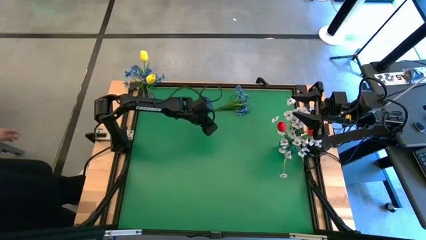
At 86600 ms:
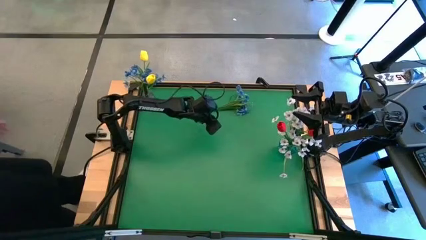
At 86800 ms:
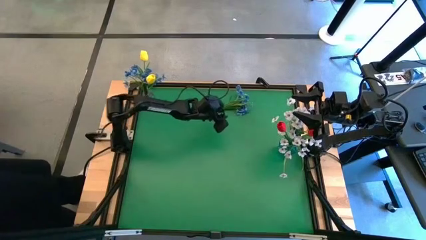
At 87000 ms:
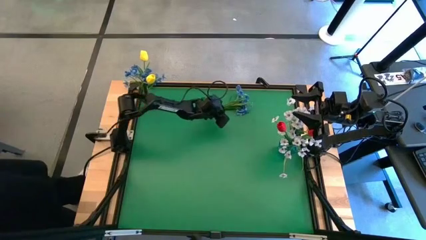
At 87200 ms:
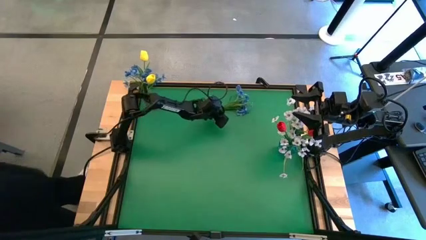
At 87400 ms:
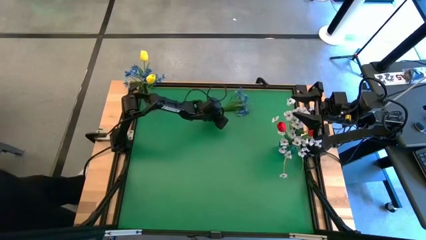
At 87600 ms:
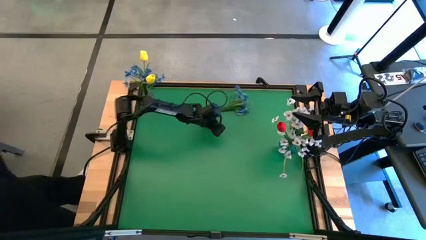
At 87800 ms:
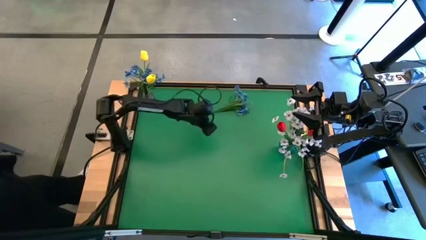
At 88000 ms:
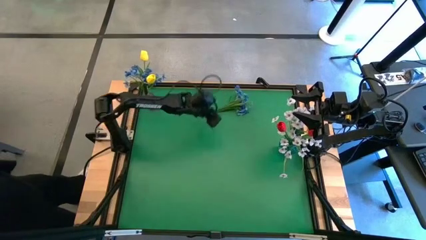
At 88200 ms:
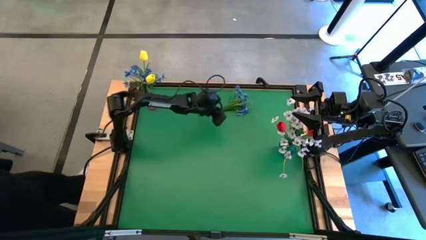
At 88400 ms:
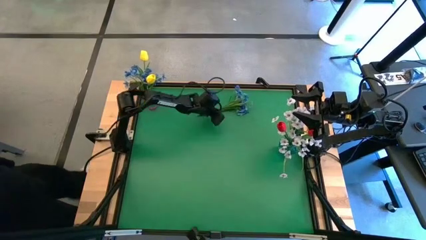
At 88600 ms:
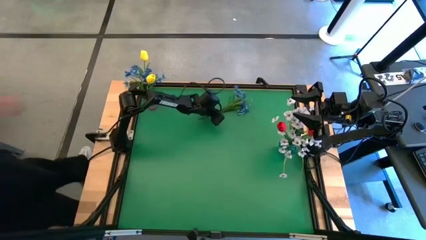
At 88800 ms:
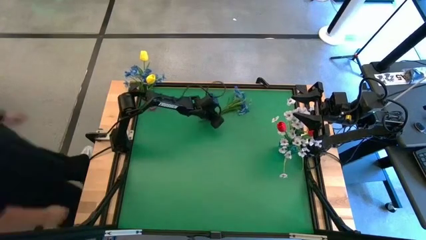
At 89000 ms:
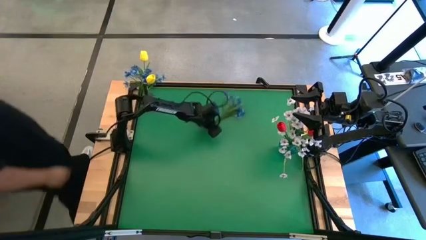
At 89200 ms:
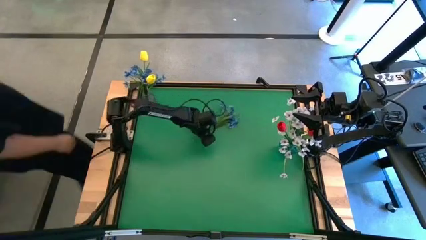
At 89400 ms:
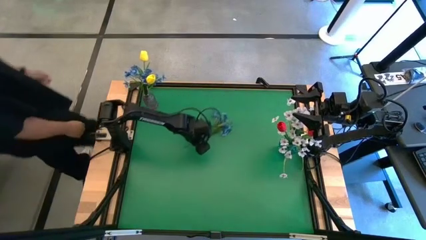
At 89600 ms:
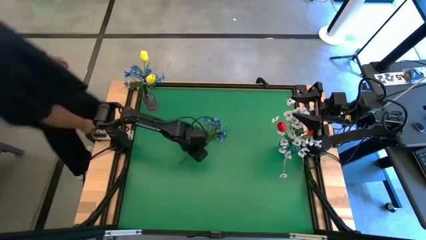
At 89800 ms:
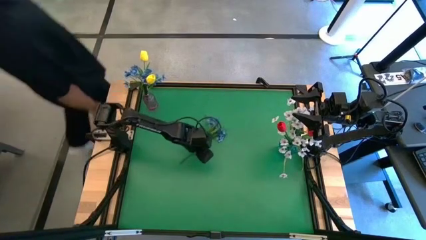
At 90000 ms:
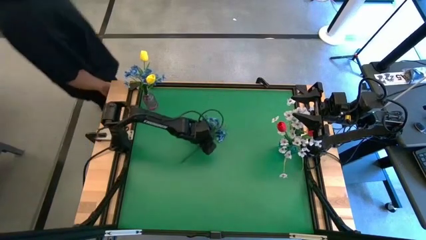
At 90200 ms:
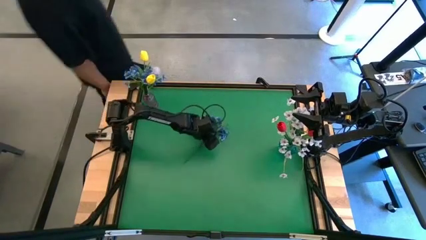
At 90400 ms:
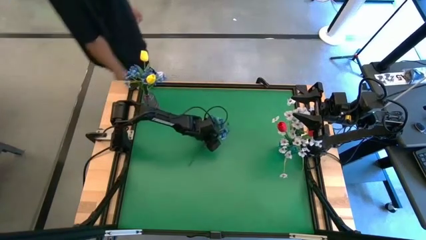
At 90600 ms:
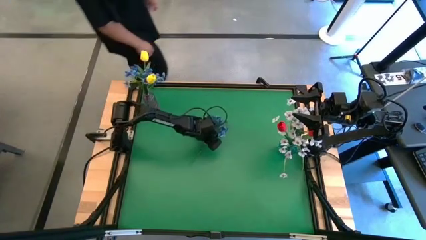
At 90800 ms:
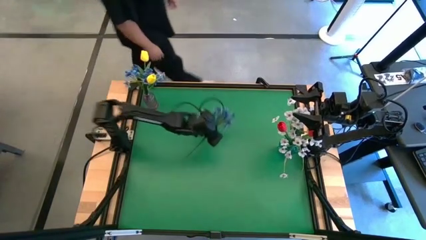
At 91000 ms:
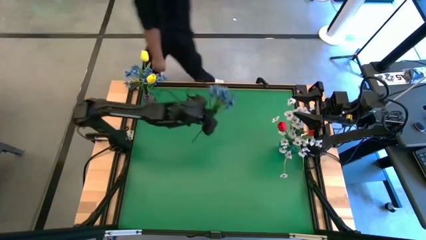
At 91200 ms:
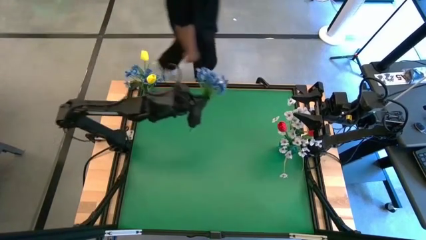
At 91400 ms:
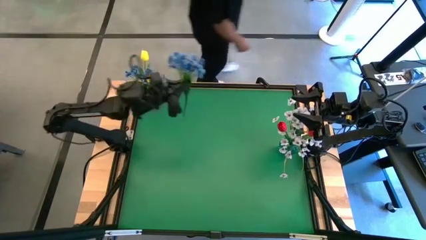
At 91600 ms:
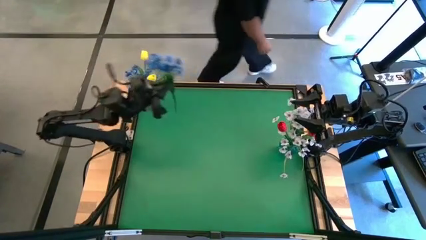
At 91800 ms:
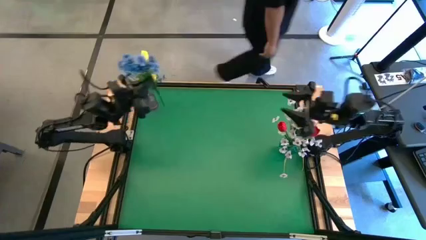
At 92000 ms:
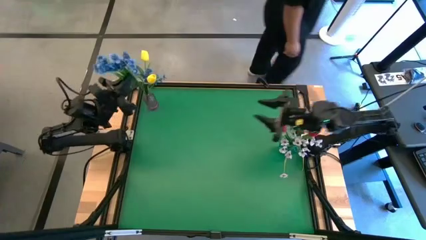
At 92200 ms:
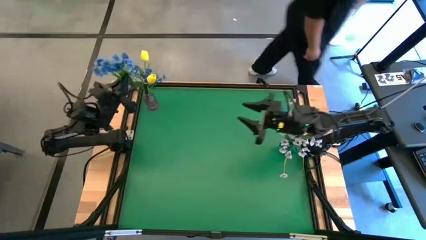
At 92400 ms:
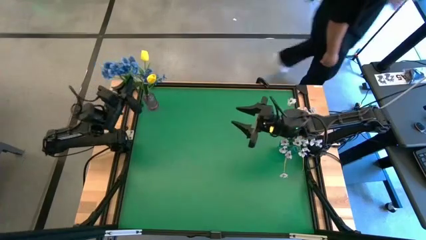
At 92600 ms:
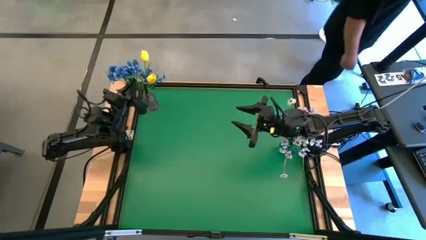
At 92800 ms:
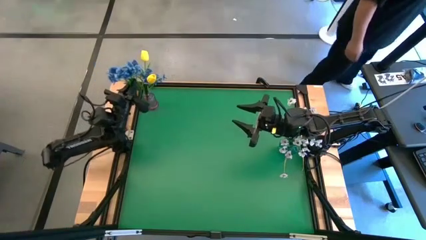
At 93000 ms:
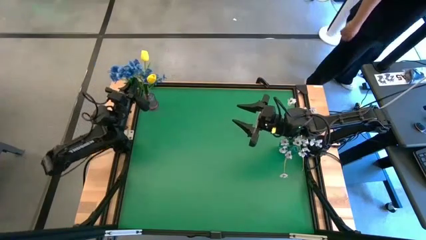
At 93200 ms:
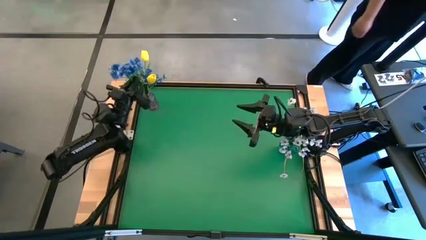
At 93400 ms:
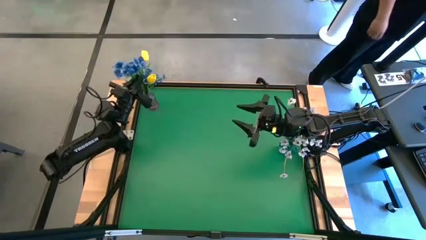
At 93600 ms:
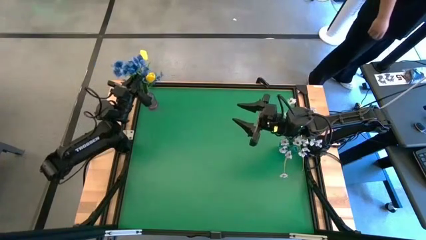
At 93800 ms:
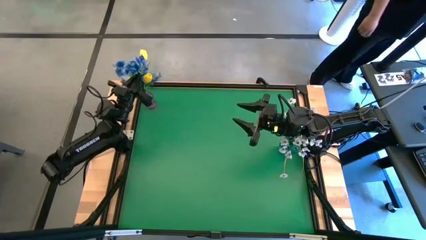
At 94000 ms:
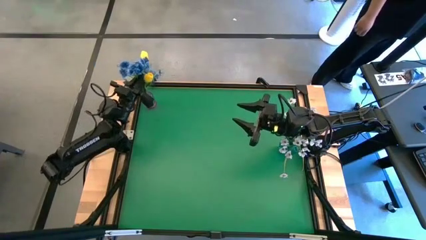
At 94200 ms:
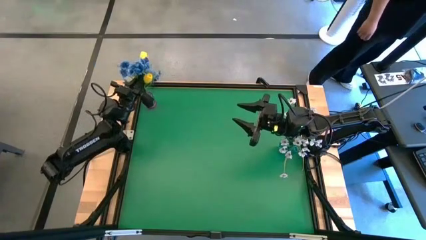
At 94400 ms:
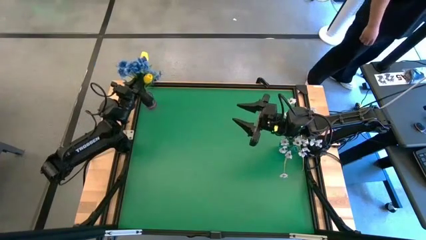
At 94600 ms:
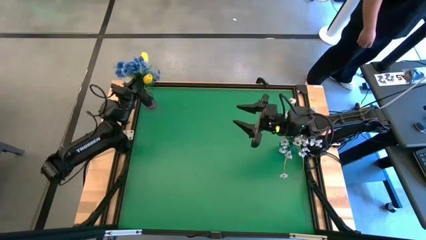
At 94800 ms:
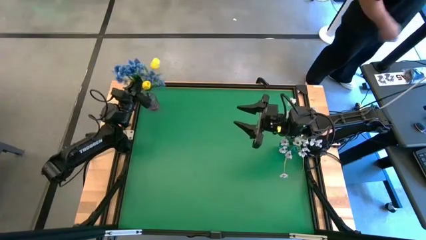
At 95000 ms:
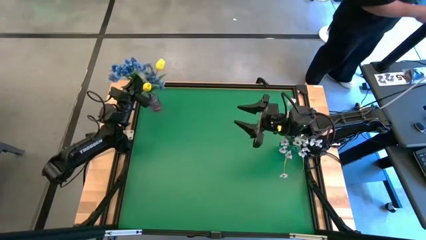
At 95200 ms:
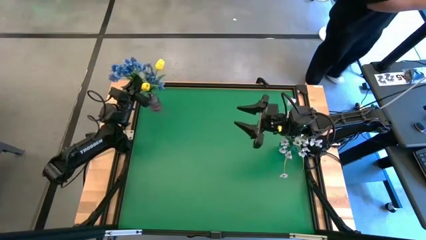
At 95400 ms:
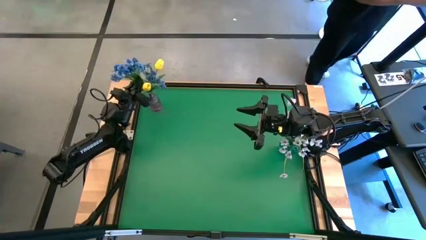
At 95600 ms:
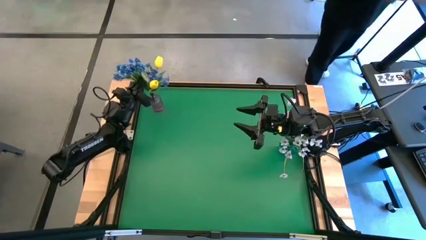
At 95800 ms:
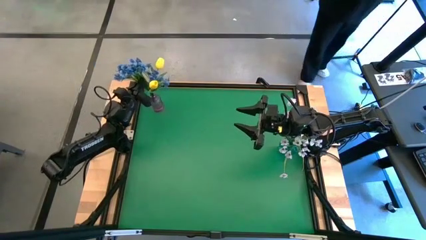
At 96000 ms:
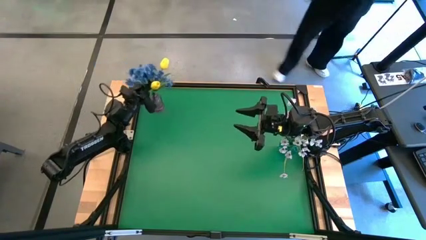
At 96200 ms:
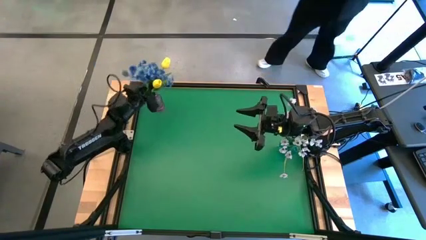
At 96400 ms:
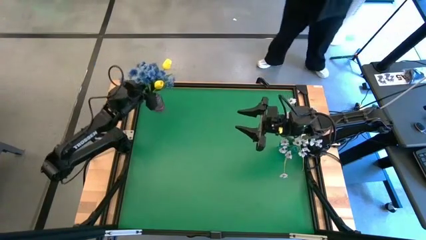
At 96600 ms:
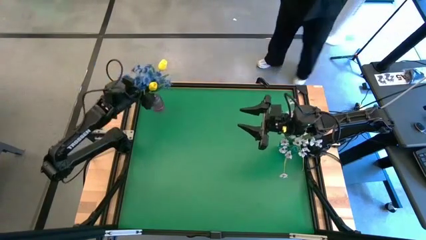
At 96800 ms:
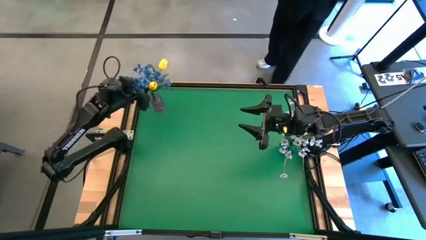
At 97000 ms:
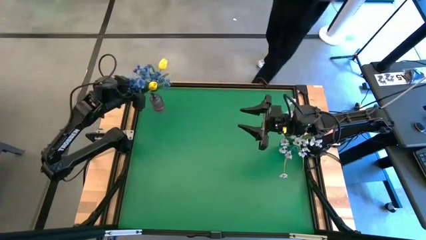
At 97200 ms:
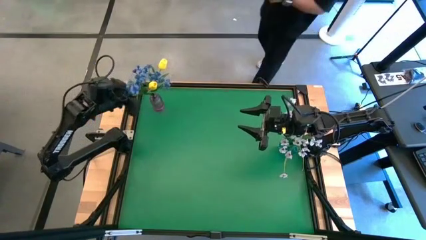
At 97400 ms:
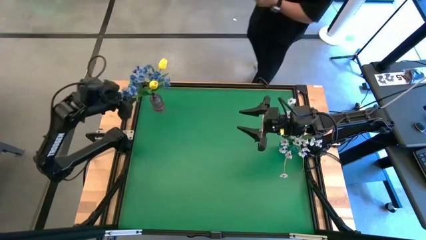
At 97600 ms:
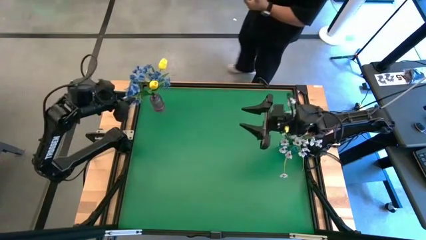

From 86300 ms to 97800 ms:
Task: Sort flowers into vase by color
Put the blue flowers into the violet vase

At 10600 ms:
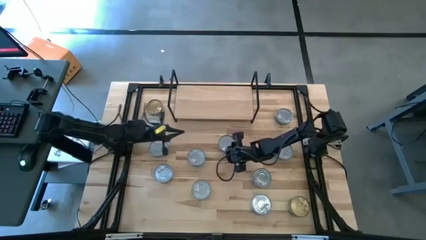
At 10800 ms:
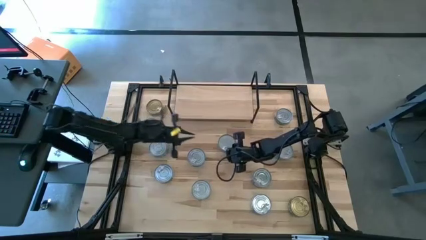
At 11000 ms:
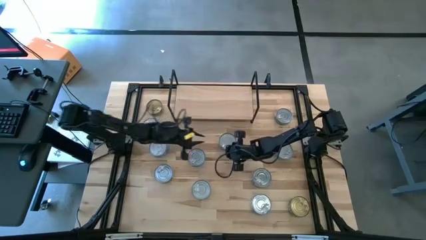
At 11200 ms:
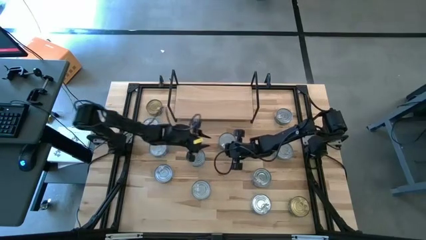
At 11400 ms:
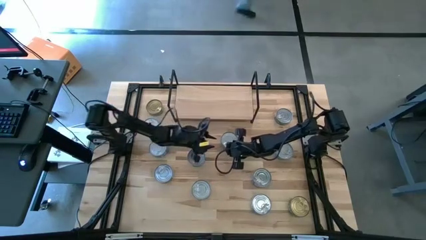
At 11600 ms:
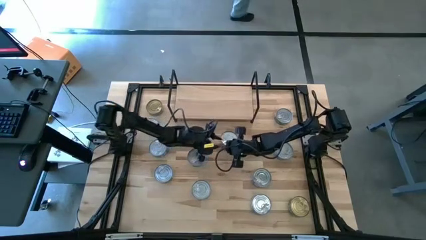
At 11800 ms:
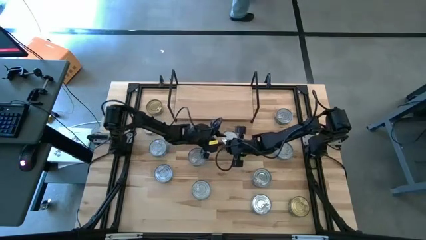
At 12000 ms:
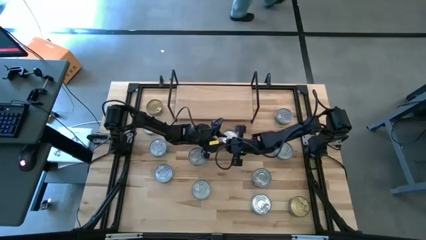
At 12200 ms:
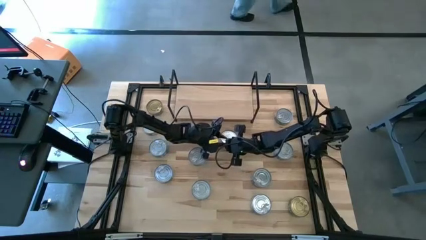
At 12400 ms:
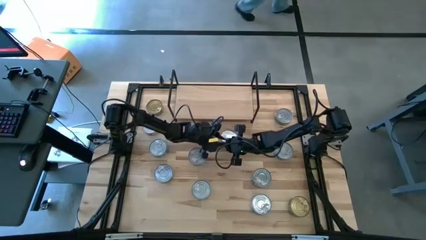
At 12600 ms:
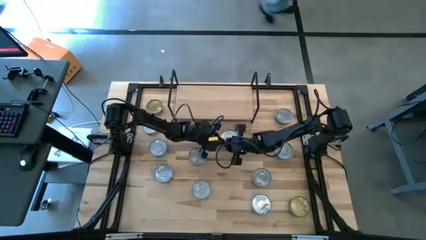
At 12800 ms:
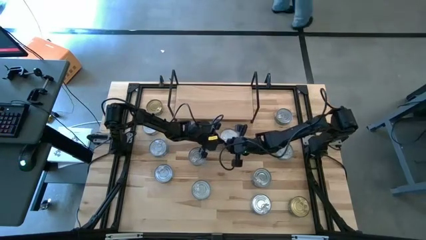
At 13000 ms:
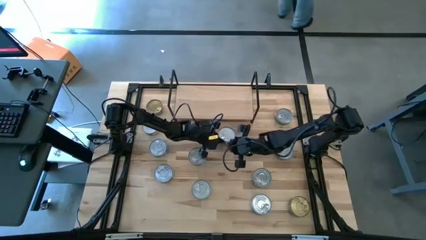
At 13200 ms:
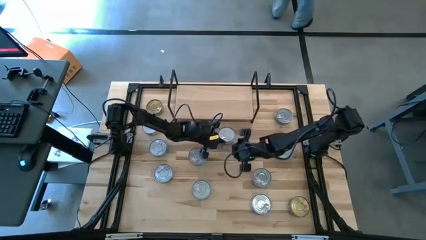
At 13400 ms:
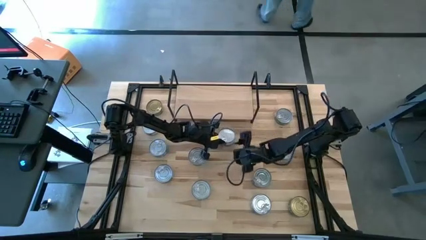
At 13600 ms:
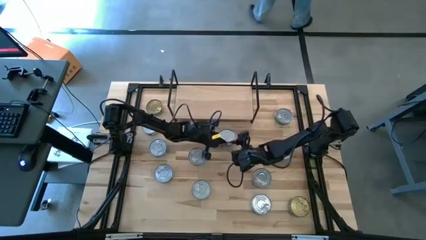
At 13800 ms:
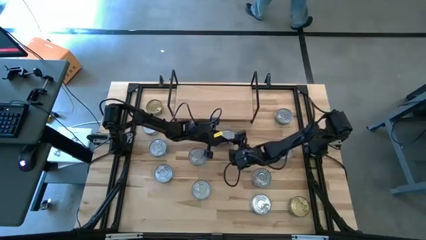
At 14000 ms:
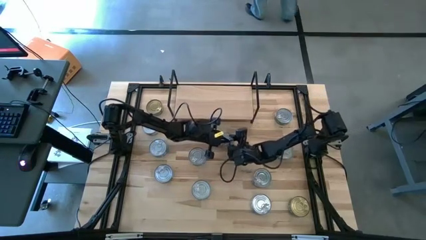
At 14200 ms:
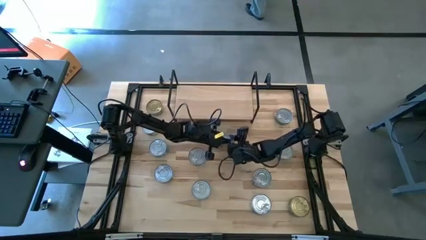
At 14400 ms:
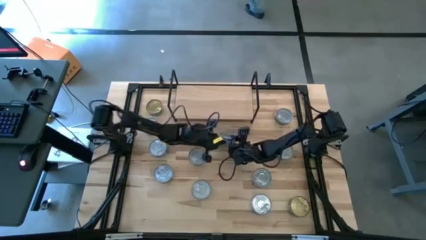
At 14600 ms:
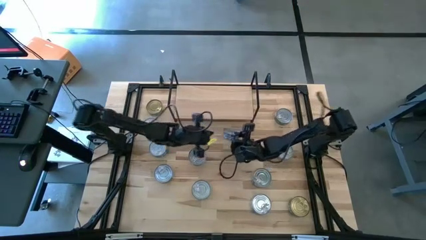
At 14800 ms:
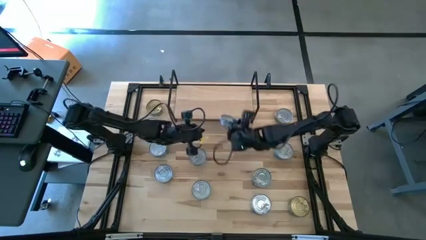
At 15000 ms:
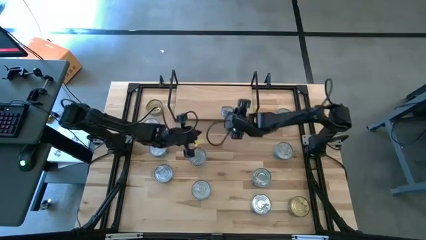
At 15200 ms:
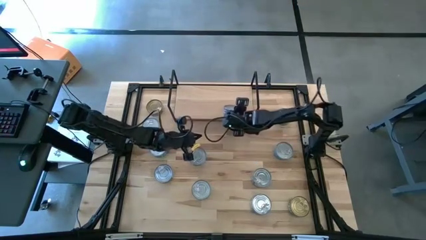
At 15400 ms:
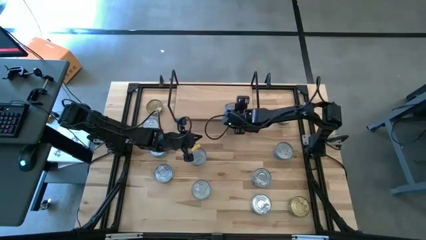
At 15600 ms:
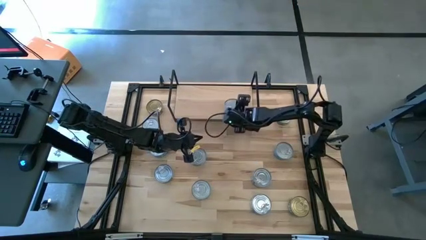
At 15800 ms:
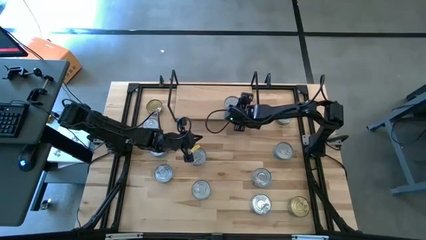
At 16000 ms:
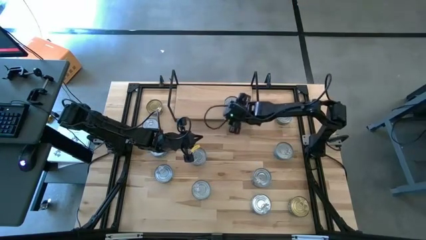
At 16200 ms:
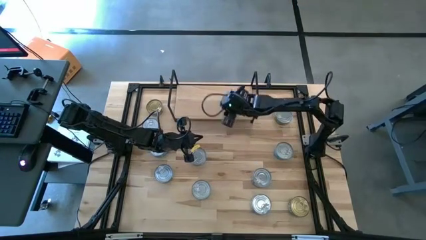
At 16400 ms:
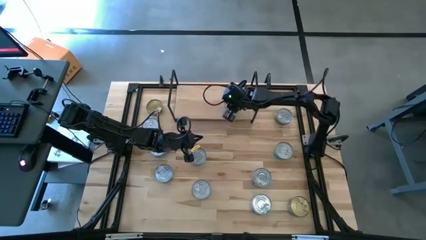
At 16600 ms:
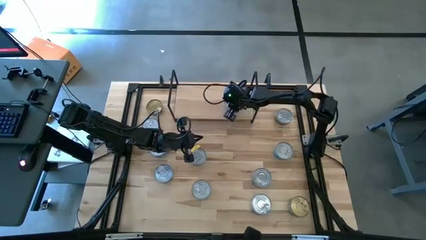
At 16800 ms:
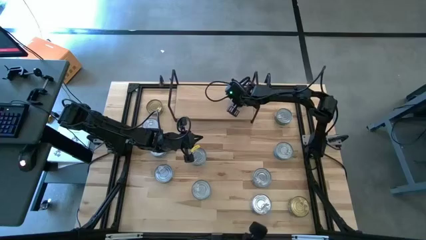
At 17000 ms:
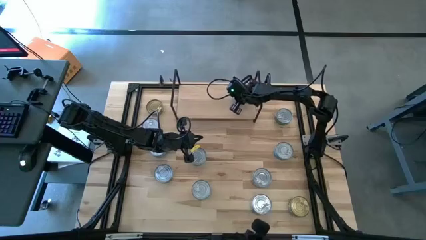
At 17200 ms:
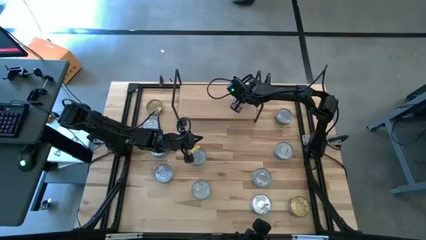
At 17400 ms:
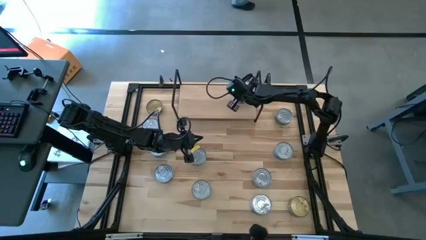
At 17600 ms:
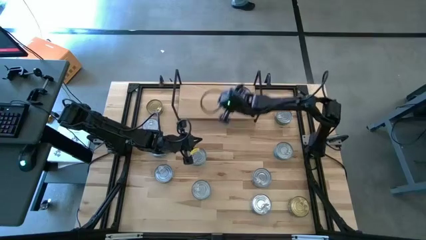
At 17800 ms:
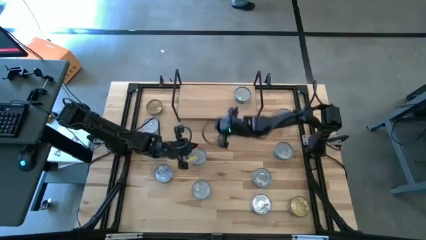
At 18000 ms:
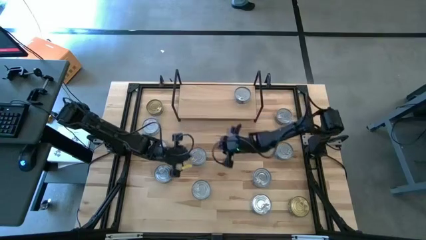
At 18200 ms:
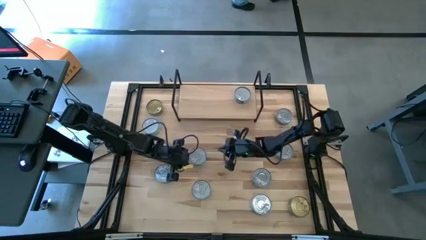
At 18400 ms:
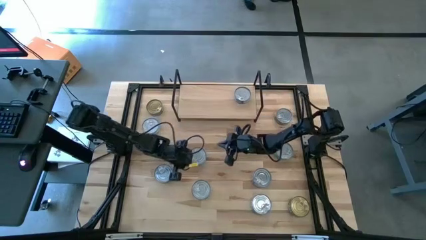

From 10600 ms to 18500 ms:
Task: Stack canned seafood by type on shelf
Put the dark blue tuna can on the shelf
